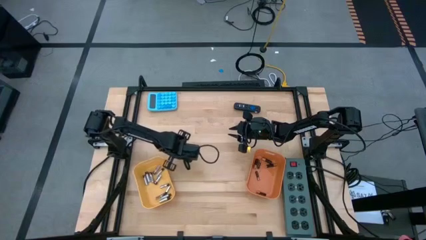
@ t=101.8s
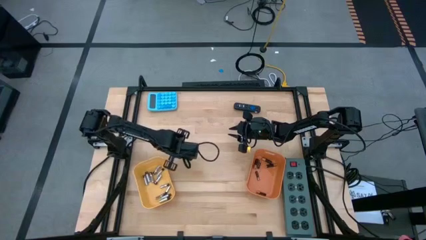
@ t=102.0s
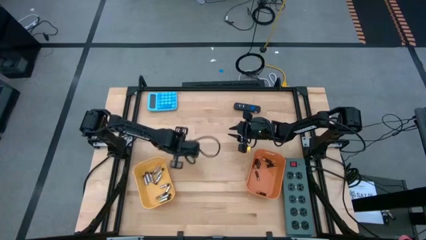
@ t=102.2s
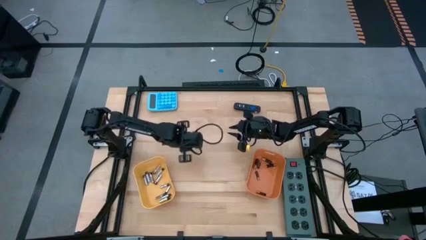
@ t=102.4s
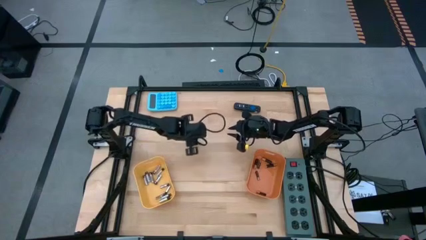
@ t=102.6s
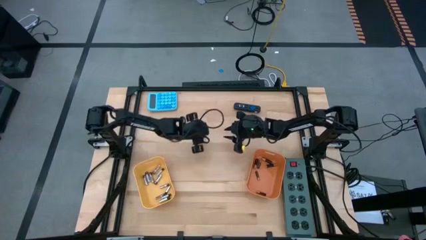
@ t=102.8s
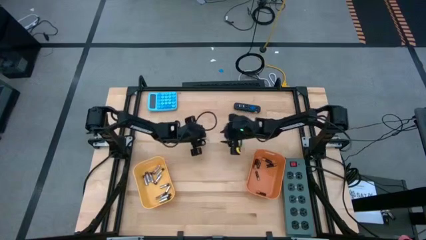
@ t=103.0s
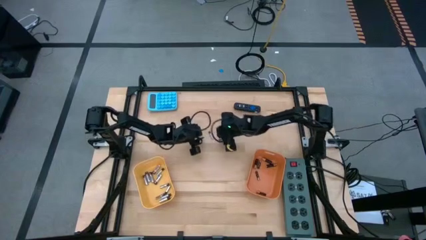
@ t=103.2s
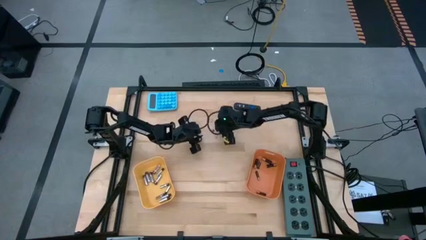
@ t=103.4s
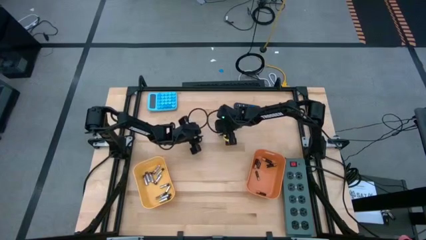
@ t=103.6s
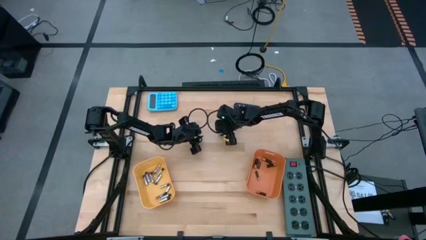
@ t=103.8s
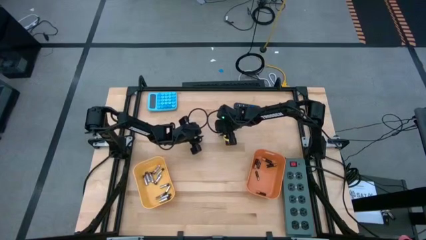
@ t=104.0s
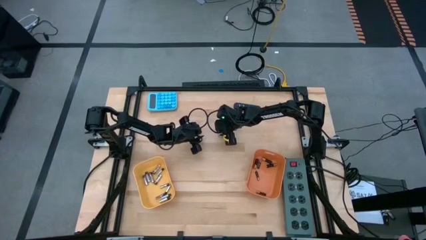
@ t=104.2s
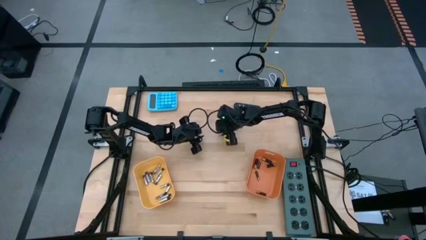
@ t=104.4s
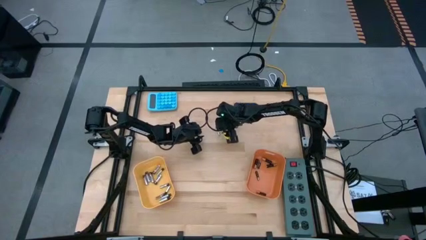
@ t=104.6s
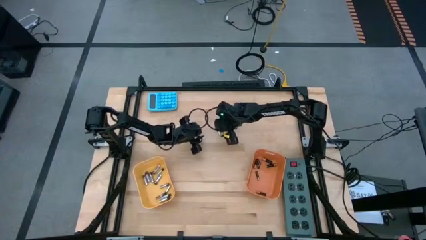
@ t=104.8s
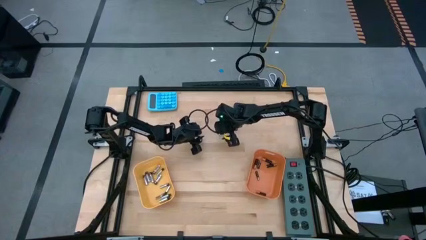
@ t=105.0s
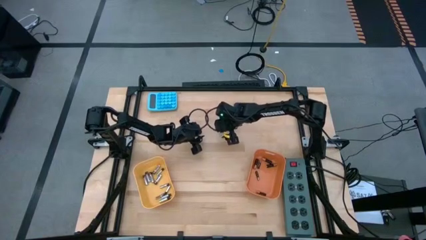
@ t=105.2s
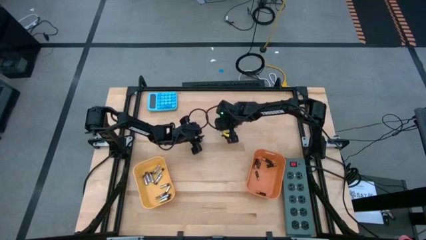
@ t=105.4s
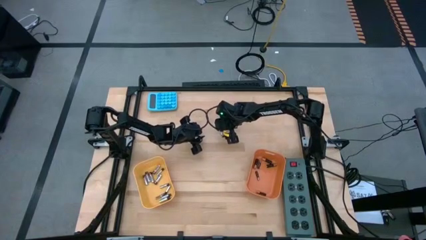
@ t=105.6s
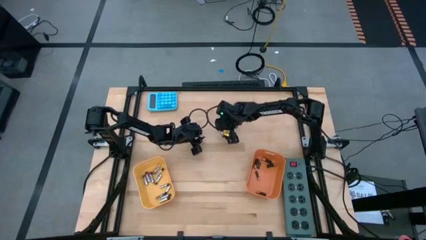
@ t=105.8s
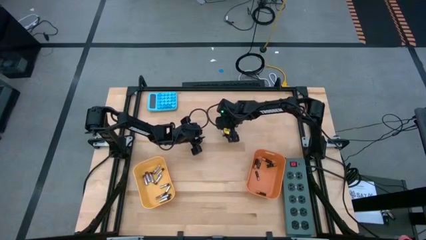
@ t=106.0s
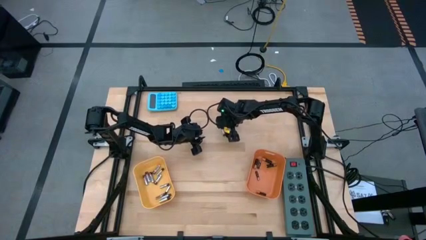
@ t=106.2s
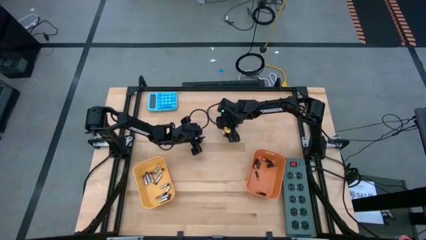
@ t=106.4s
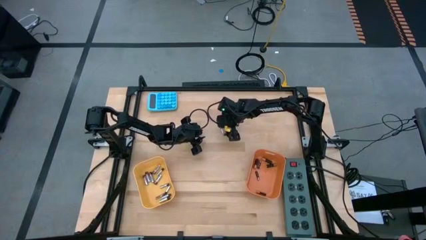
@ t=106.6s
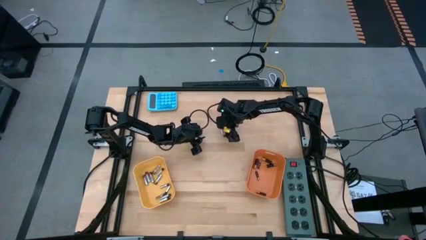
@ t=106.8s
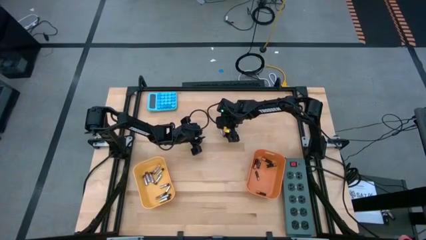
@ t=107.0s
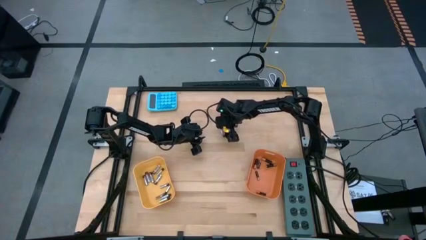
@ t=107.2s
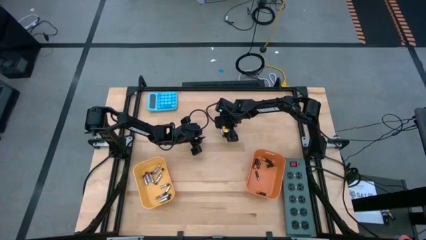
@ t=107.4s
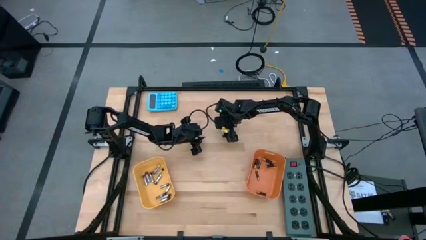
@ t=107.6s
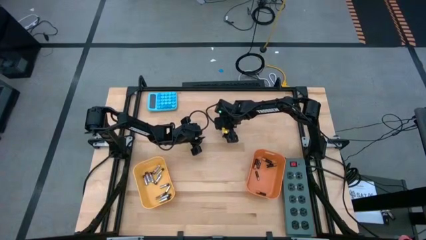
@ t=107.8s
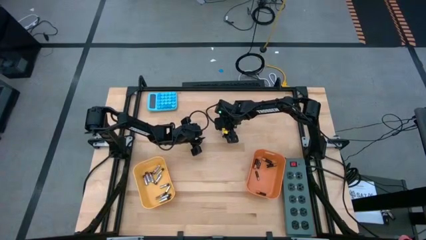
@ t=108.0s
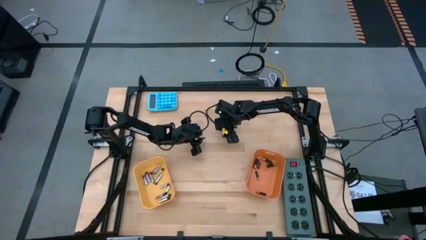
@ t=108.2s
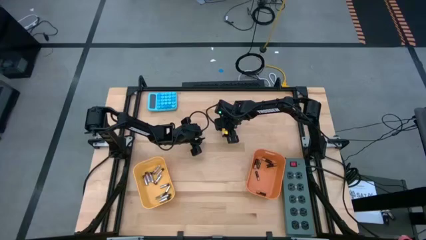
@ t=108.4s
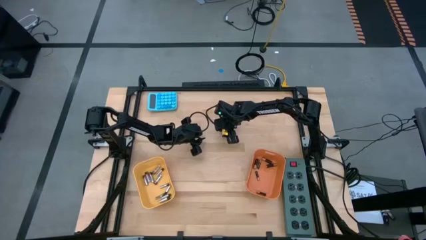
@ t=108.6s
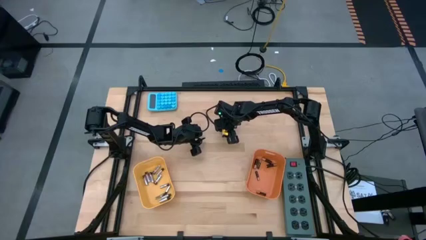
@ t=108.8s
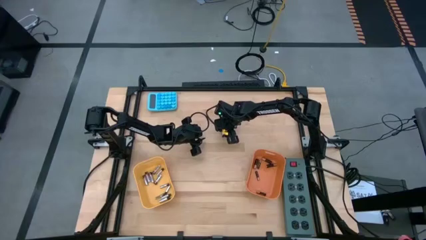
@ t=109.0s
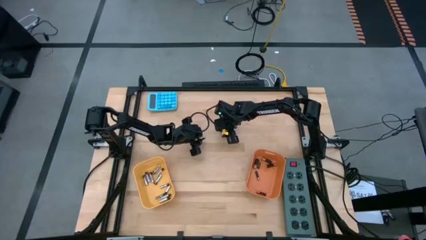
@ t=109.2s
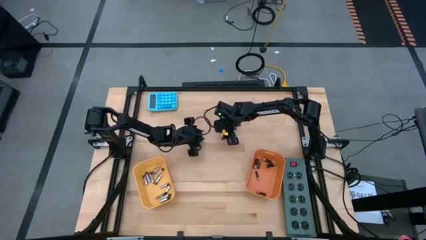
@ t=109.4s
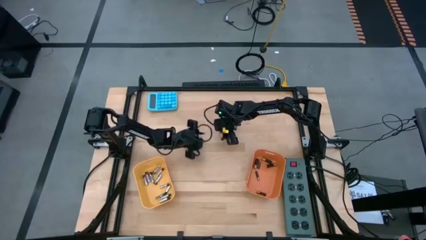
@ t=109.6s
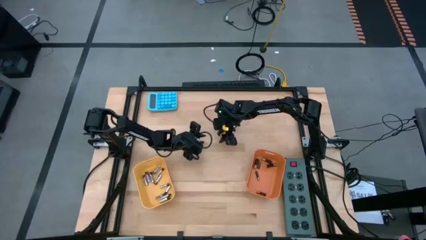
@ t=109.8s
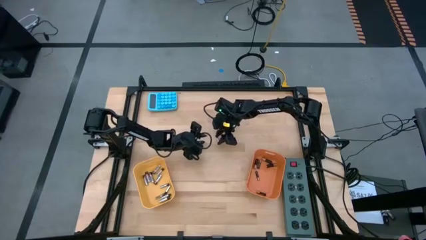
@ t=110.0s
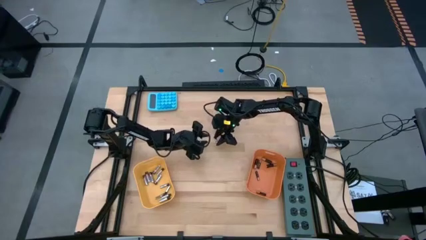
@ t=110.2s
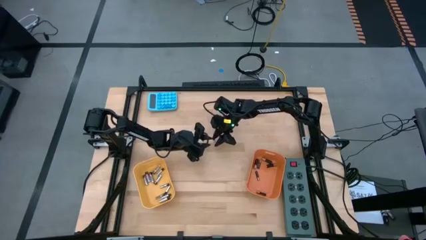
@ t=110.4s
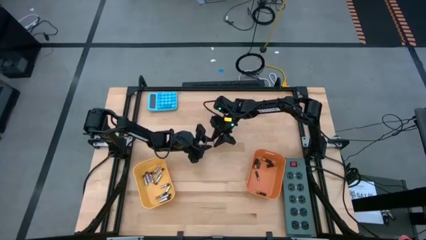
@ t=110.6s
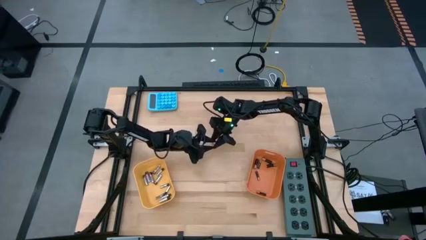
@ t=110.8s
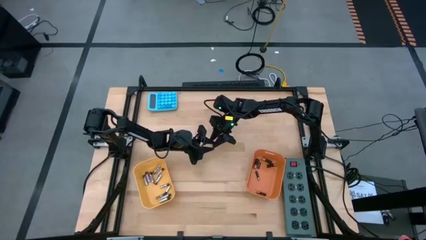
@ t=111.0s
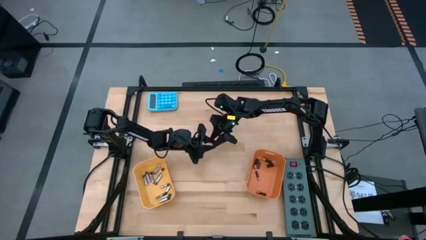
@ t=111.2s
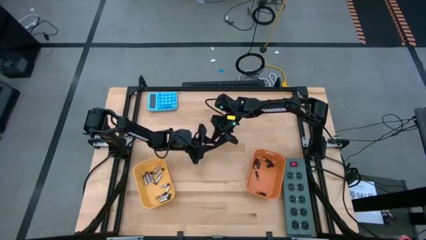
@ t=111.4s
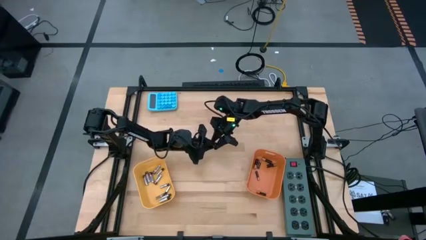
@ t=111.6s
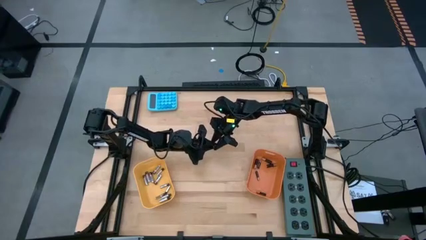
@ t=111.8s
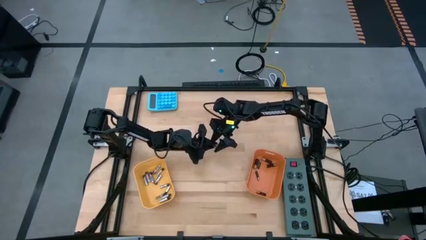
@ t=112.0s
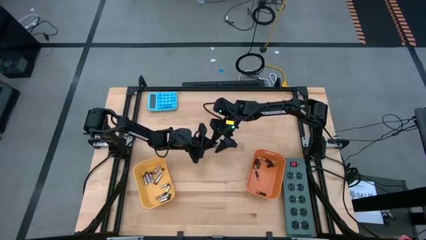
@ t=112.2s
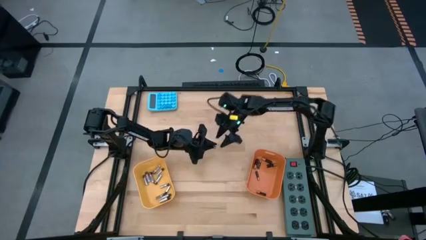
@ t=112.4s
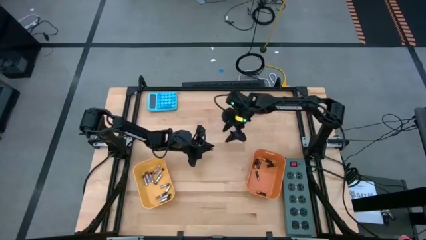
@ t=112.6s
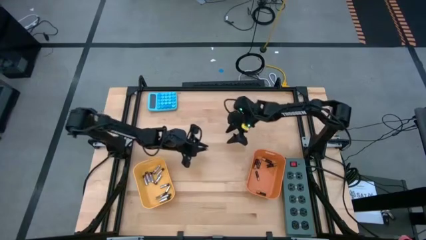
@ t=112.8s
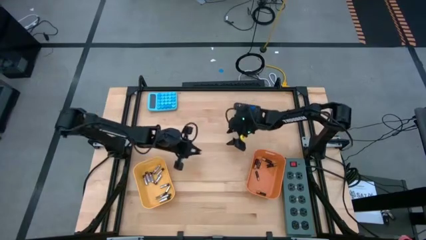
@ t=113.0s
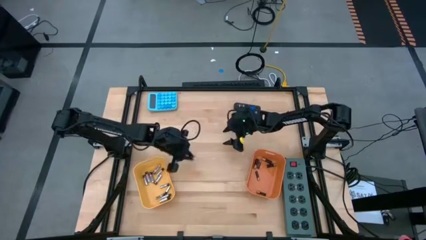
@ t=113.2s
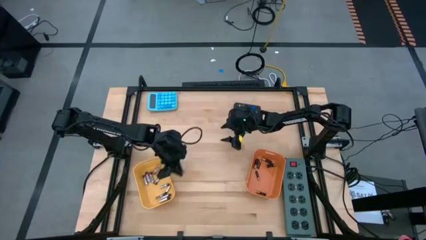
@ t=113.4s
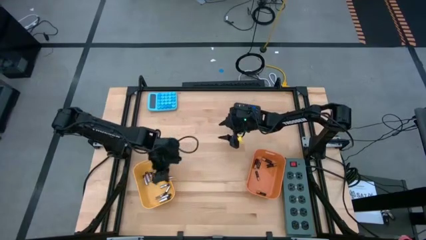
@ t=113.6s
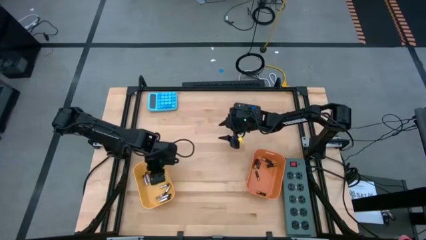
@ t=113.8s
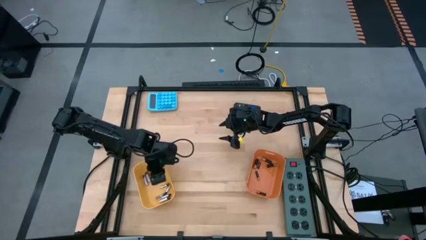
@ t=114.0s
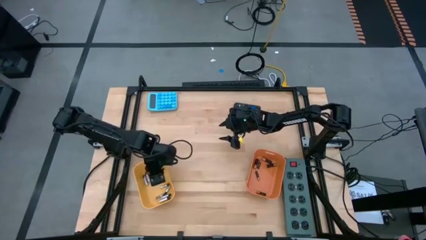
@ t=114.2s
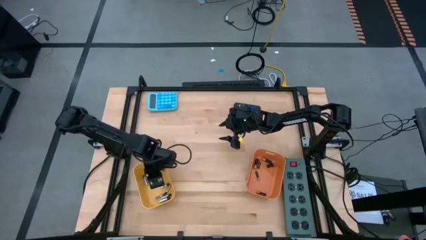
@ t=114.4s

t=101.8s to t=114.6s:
Task: Sort batteries
Put the silver battery into the yellow bin
